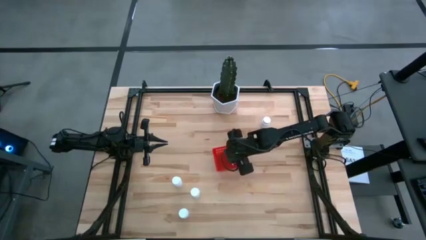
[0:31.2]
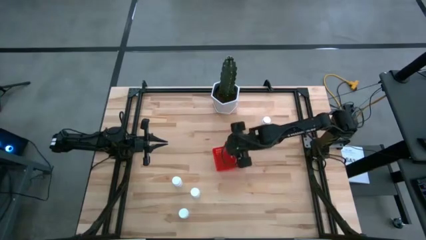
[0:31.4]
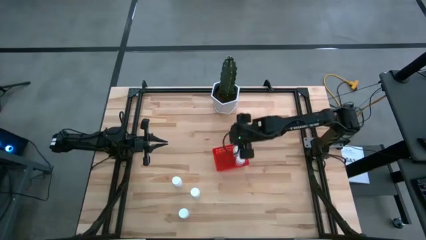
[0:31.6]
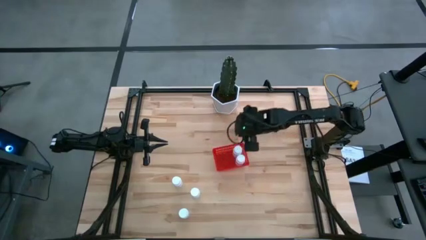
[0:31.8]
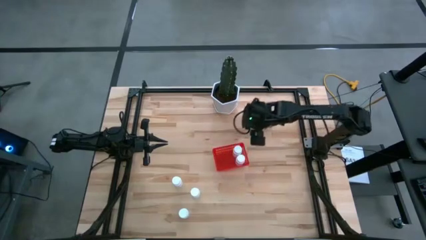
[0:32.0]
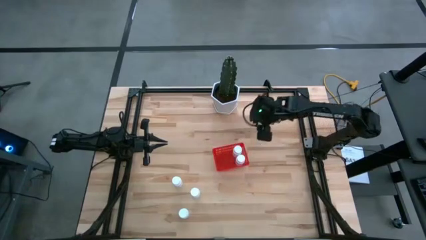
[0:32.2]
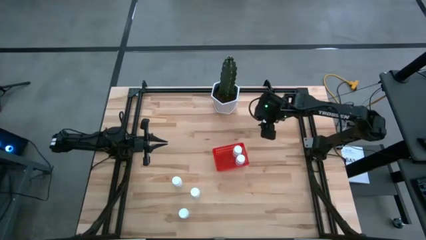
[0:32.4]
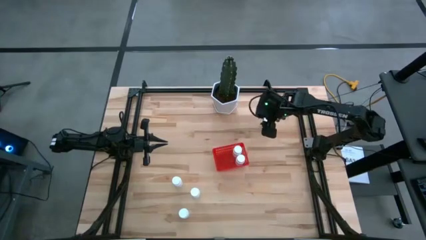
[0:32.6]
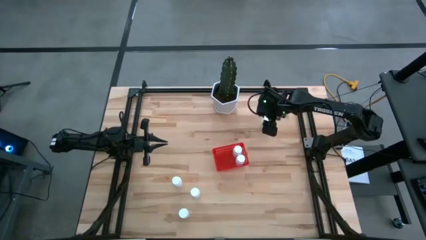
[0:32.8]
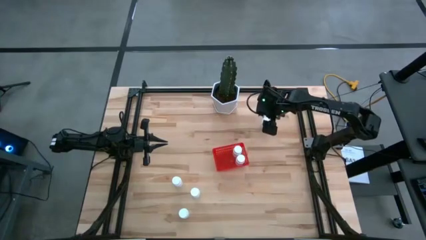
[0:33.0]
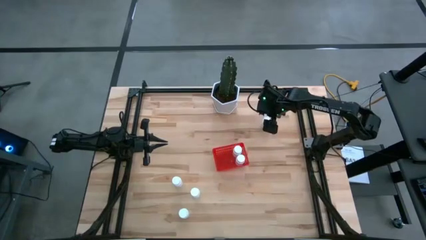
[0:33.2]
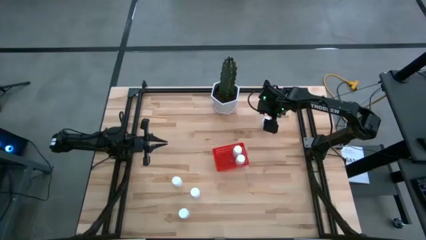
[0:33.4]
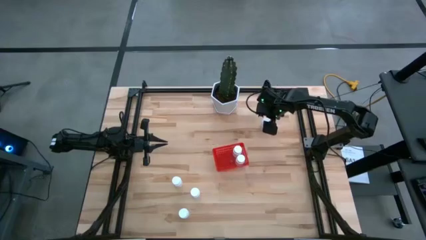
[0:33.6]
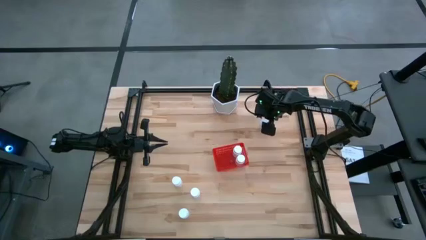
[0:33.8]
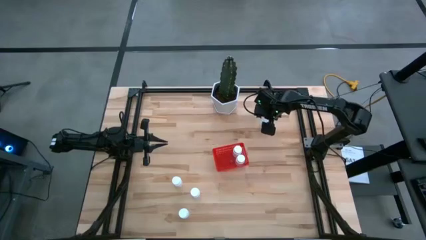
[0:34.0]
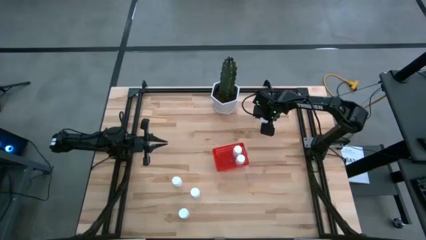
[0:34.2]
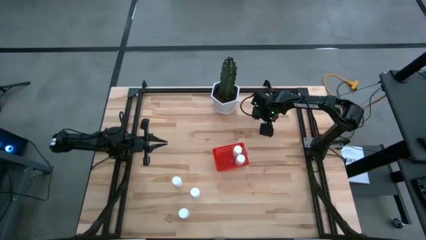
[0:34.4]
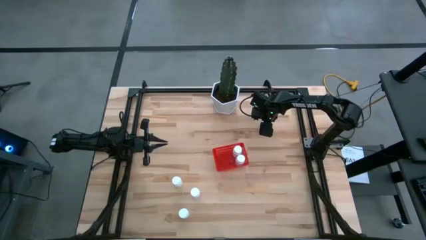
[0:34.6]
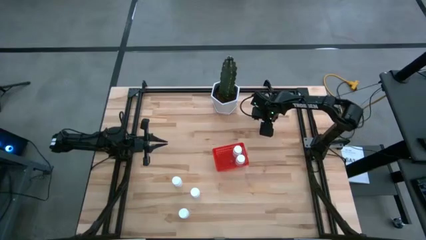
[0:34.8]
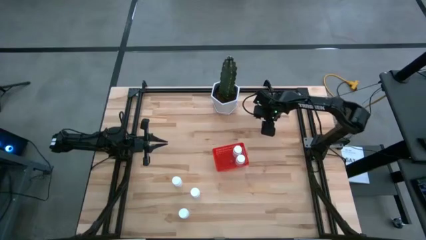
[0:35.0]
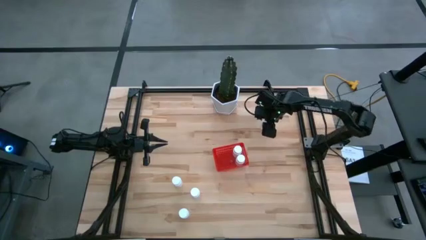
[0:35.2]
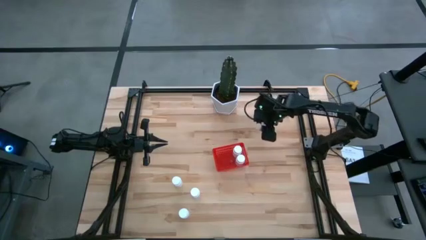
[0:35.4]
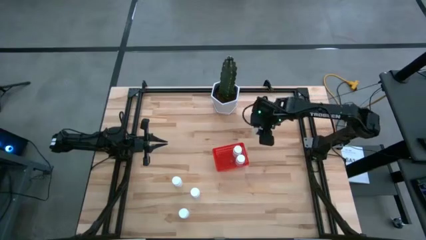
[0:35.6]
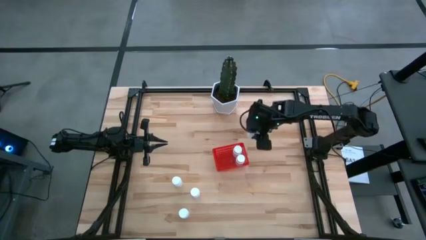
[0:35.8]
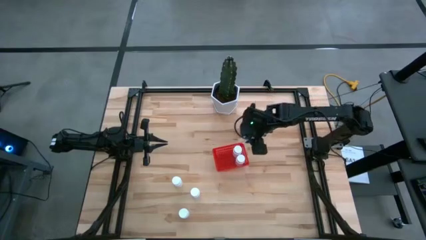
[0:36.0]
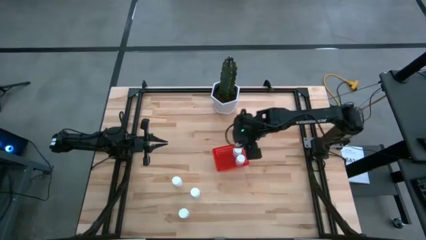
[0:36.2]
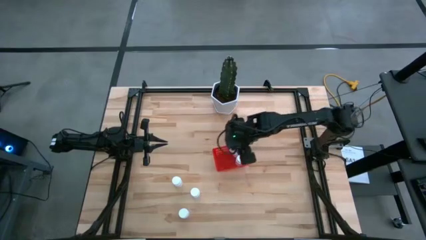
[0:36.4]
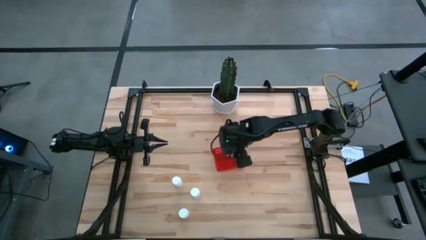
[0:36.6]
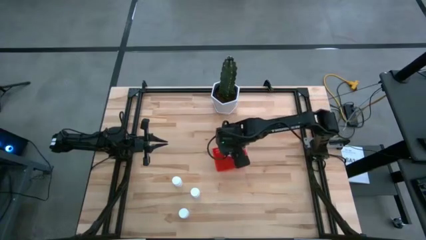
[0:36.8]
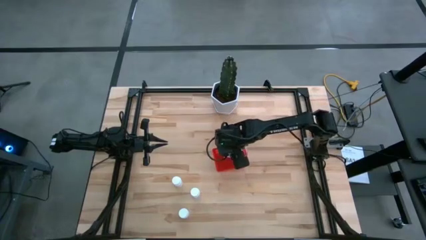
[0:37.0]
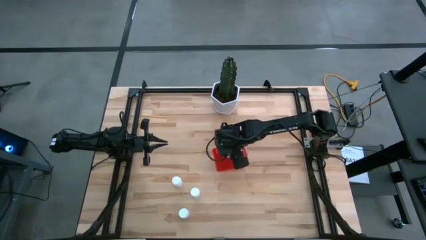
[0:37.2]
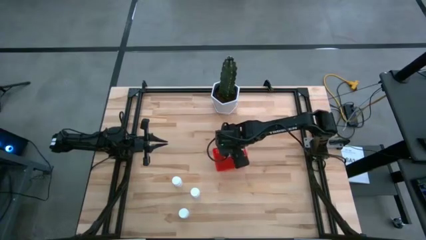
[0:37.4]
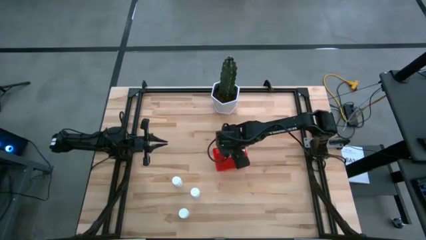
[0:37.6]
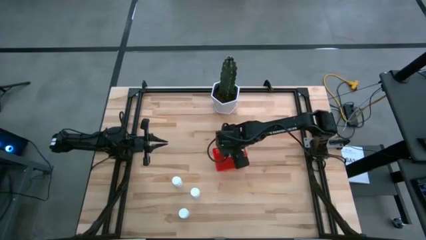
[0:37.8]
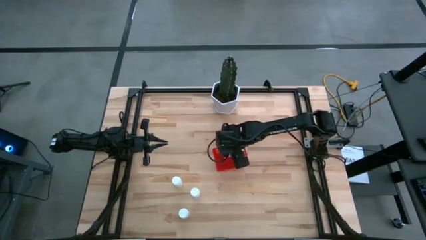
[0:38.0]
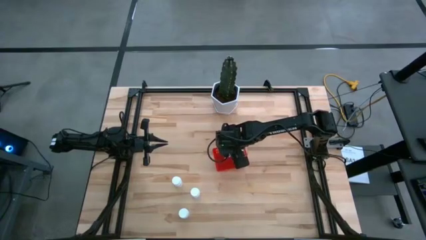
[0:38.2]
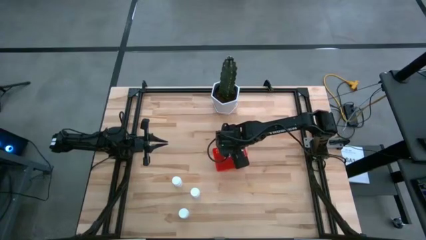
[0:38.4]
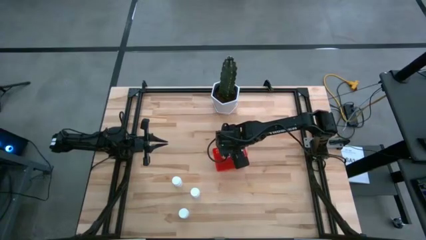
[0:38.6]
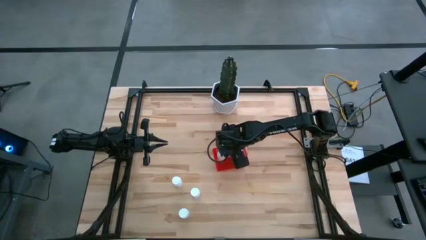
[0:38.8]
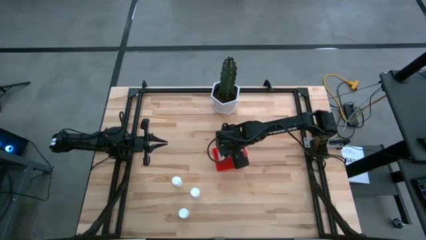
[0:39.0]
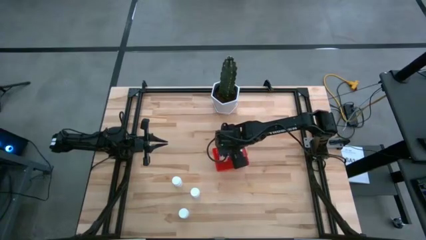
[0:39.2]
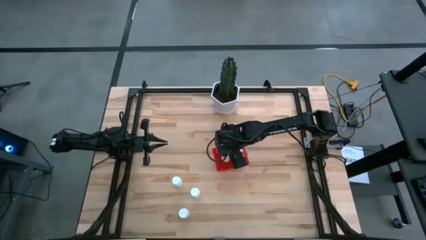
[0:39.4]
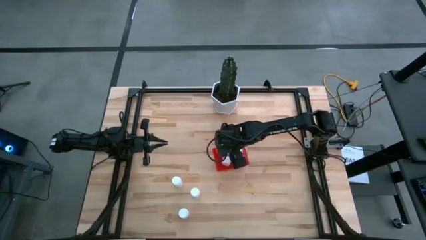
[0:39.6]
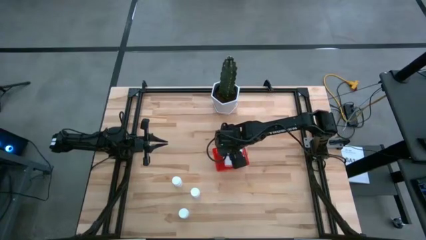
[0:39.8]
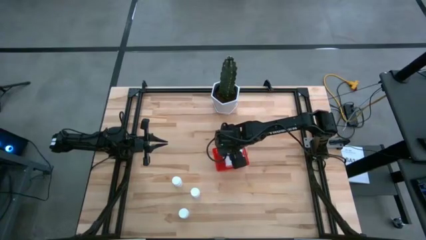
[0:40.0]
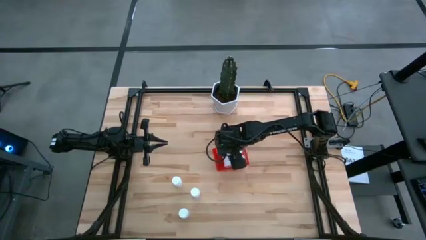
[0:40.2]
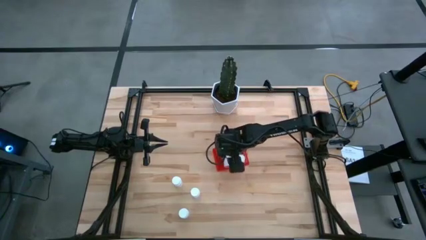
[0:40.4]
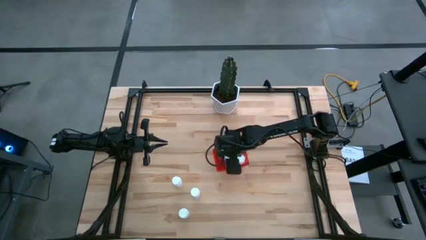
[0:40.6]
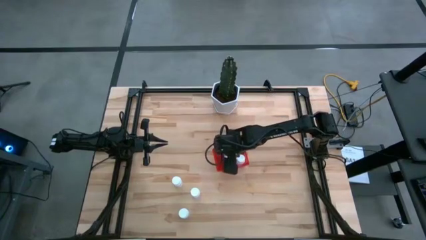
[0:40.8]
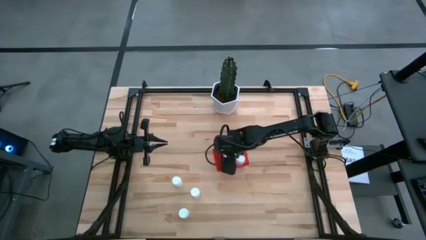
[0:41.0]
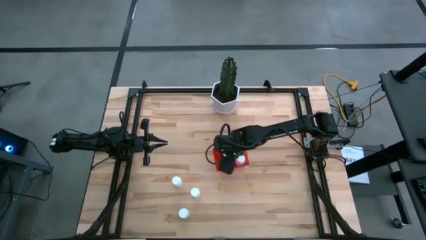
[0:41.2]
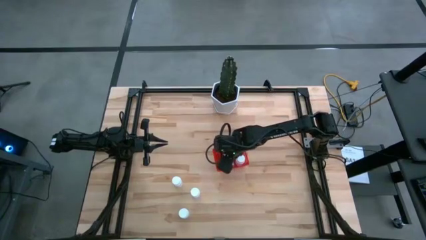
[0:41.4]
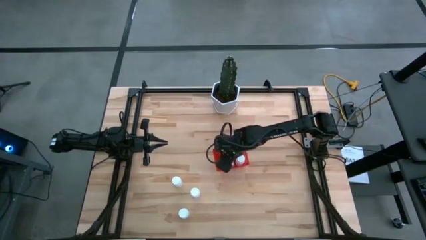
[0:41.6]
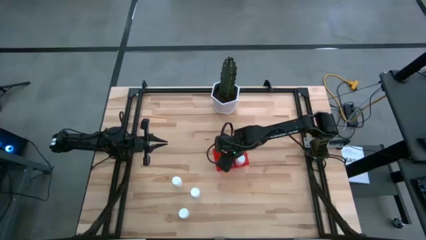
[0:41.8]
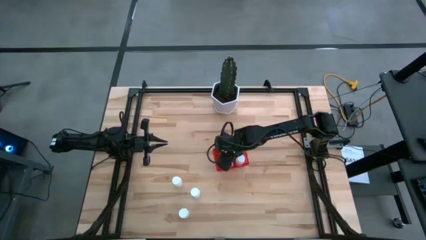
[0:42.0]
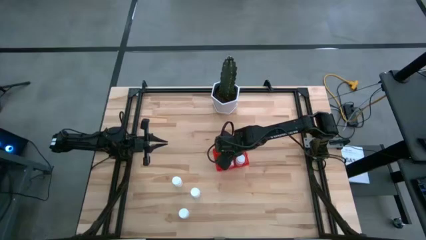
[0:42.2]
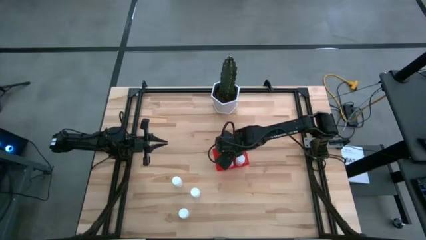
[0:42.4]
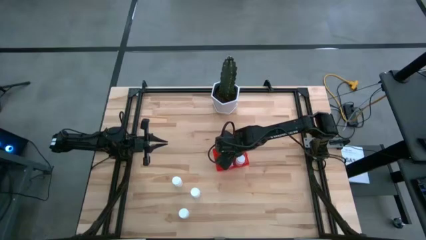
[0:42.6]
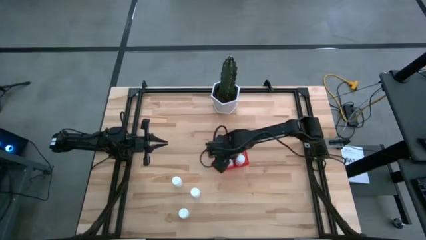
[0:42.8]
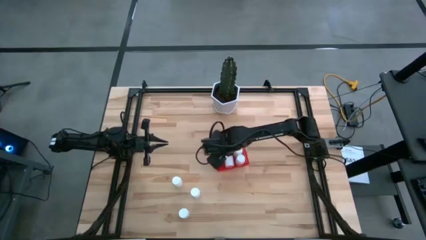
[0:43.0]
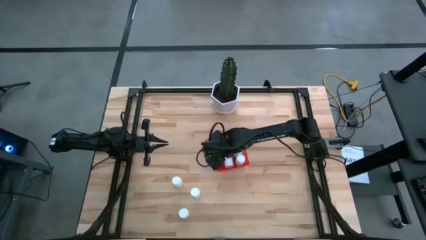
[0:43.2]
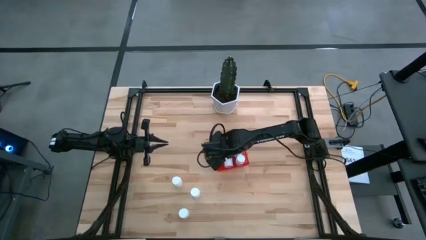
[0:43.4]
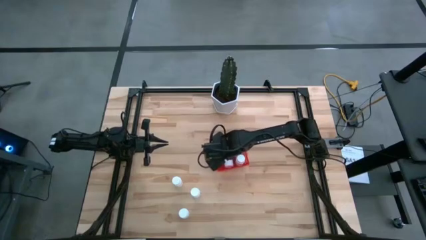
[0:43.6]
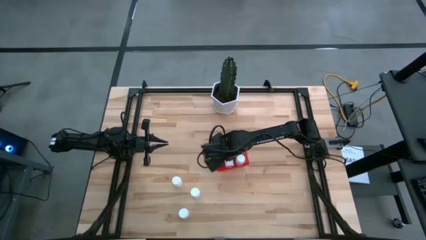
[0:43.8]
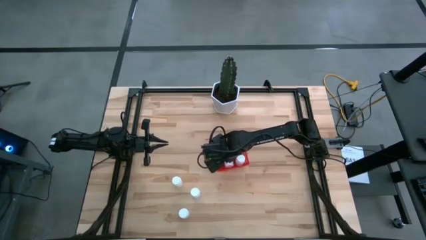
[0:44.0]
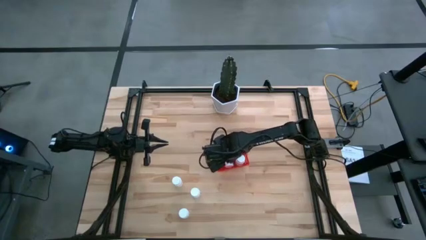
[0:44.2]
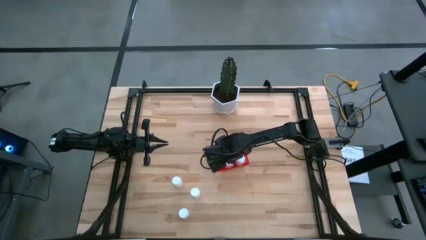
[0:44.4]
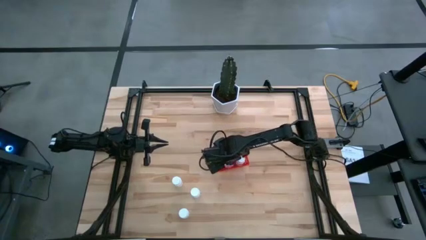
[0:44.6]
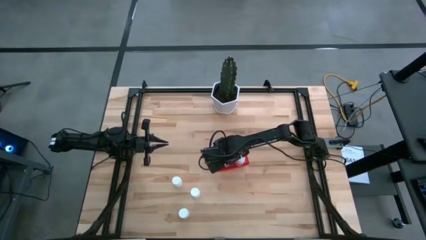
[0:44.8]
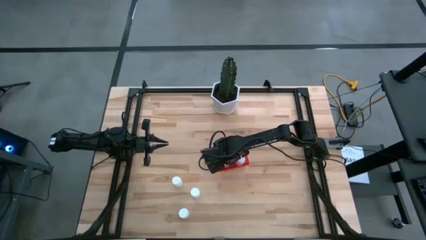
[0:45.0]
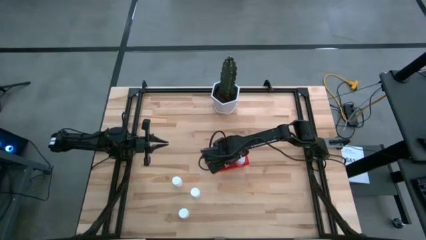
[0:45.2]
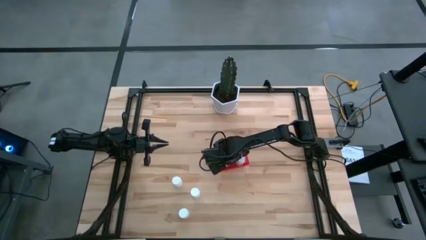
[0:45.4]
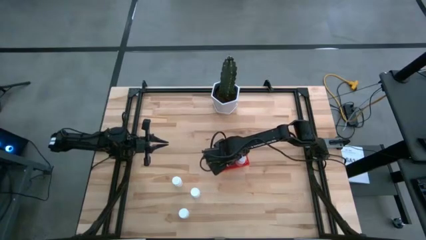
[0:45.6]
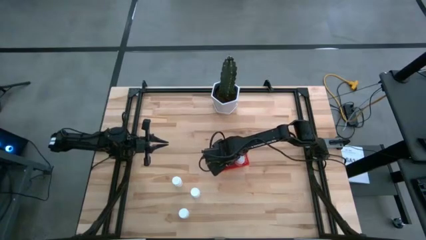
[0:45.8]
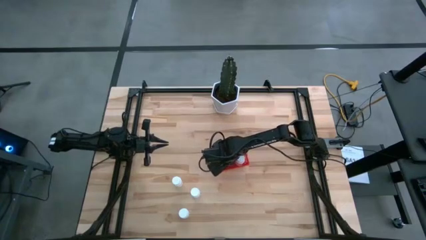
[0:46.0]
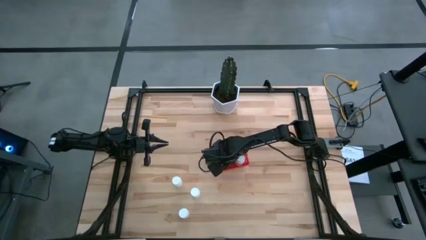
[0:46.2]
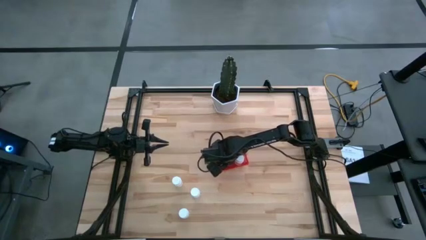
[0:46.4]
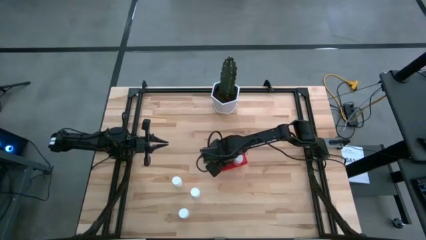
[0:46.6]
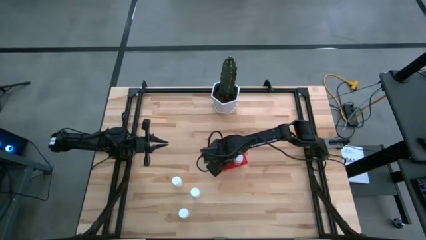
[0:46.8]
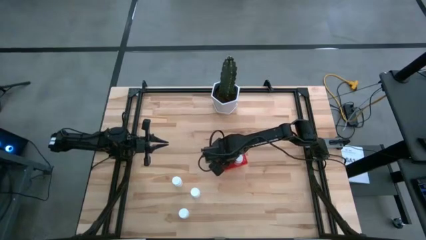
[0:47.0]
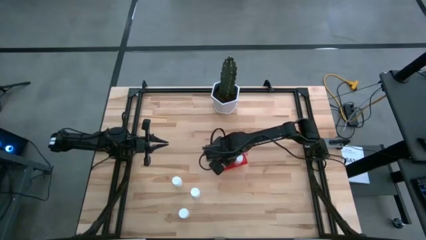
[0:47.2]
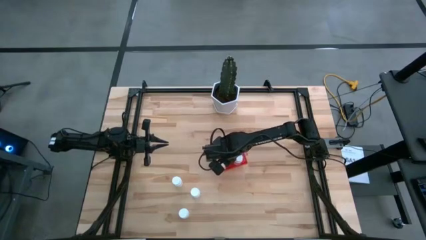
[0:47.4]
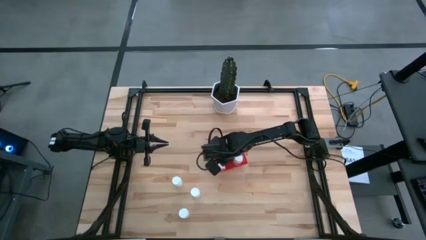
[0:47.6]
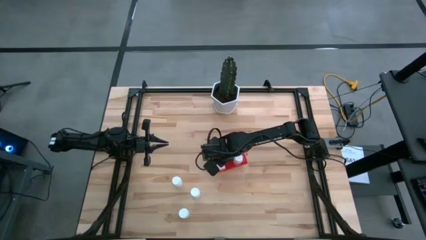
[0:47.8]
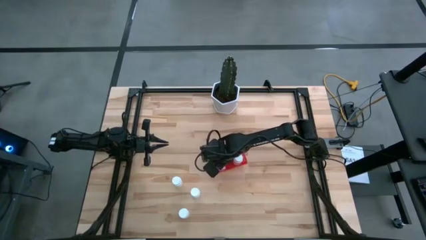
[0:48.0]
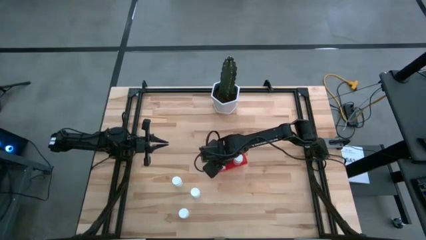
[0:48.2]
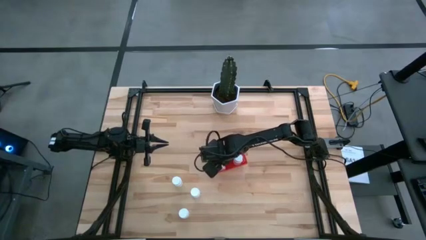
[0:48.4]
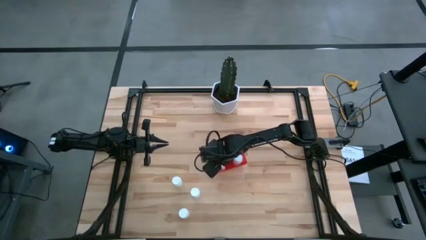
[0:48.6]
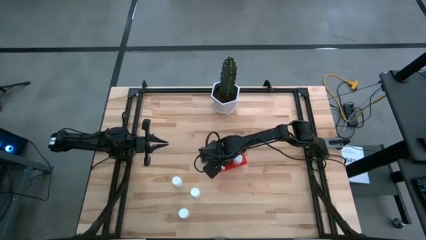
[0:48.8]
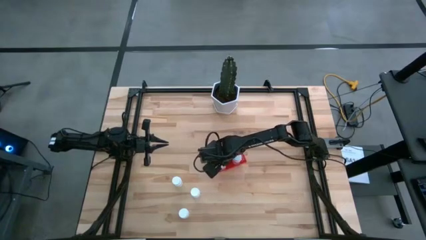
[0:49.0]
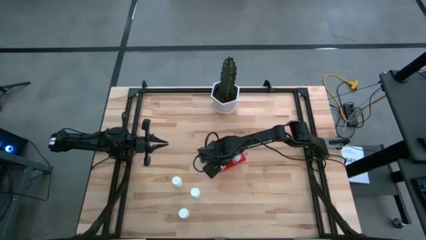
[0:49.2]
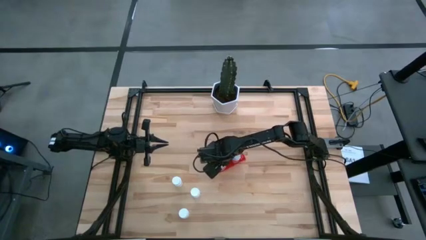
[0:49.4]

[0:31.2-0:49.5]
Task: Pick and place pill bottles into a basket
Put the white pill bottle into the red bin
